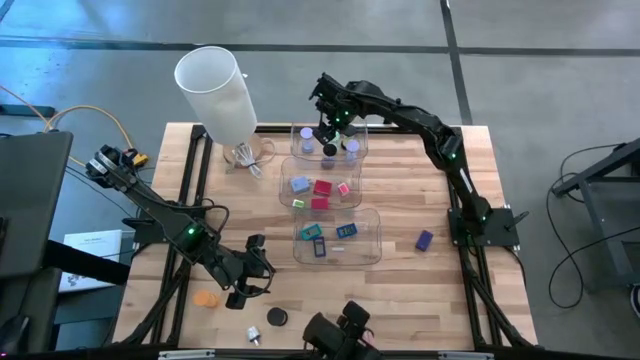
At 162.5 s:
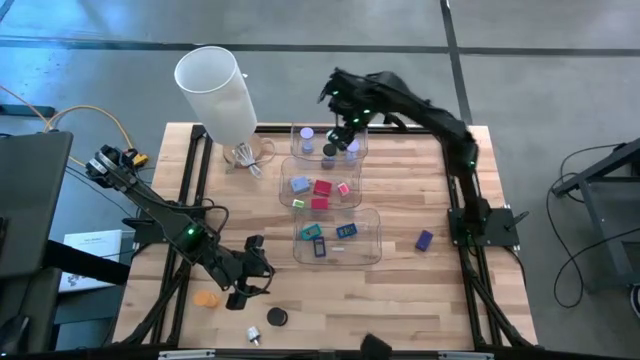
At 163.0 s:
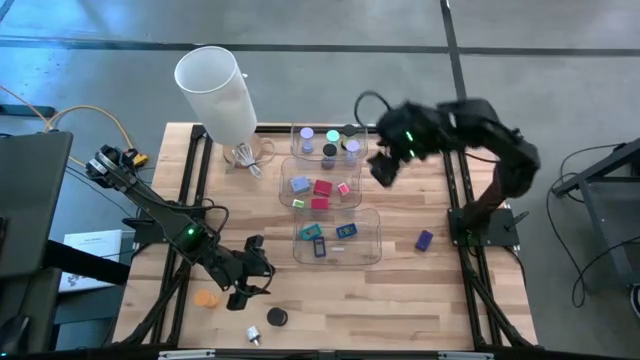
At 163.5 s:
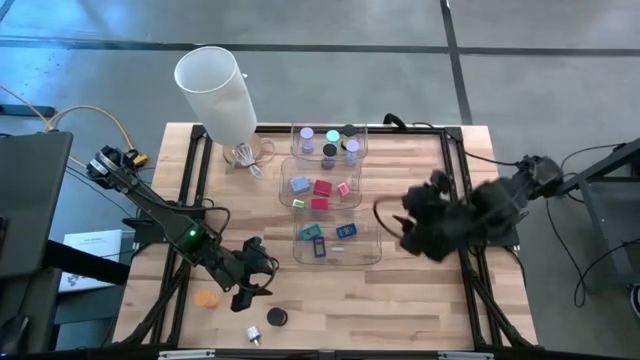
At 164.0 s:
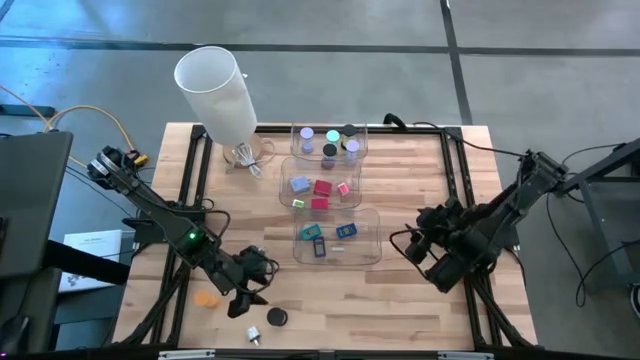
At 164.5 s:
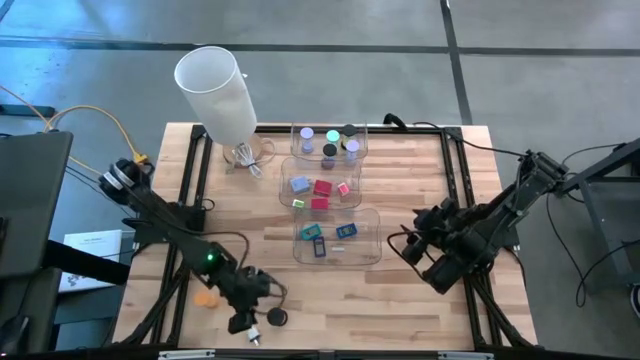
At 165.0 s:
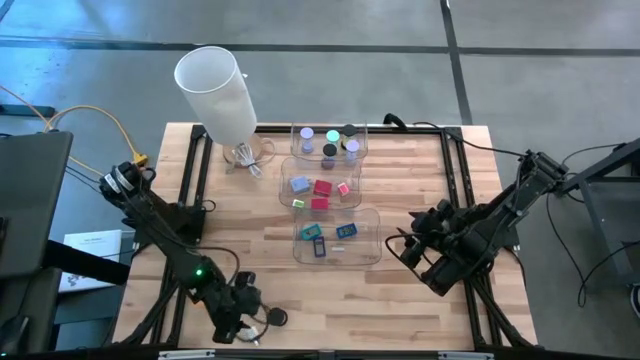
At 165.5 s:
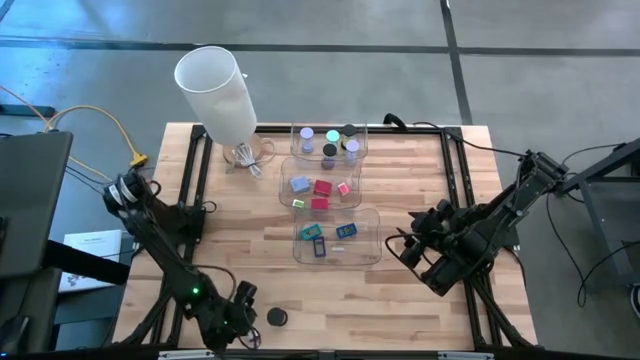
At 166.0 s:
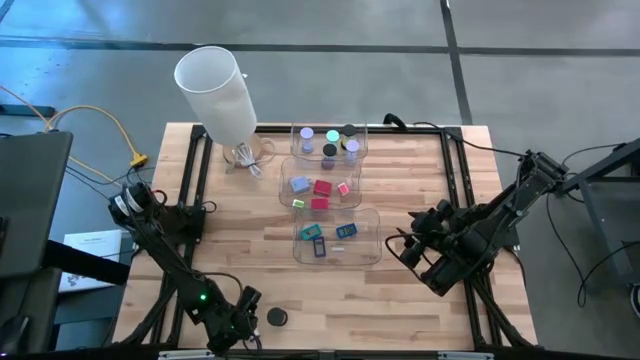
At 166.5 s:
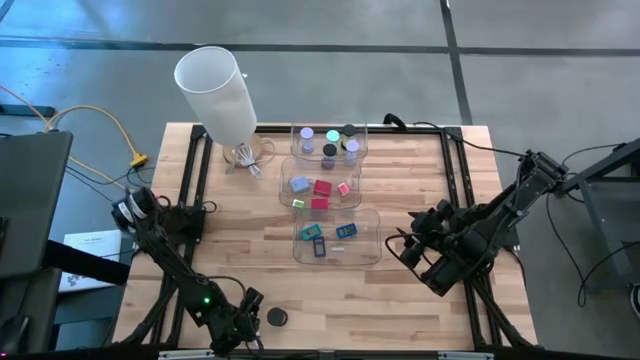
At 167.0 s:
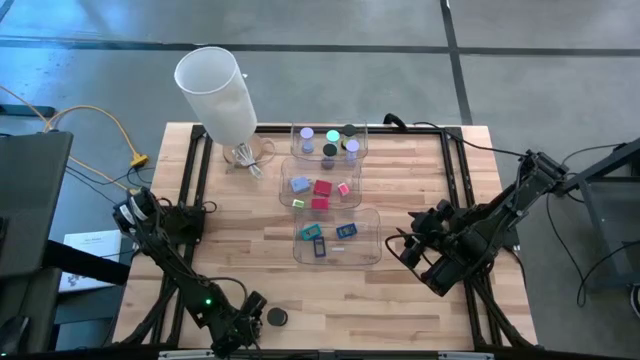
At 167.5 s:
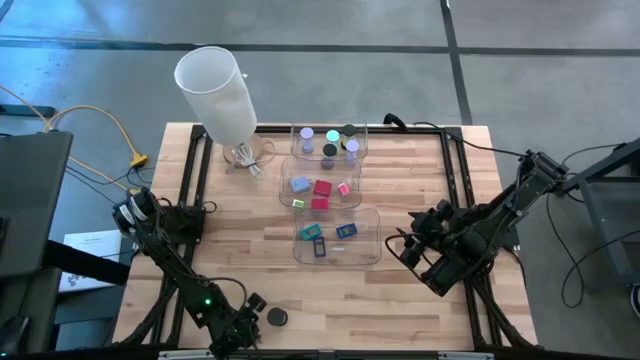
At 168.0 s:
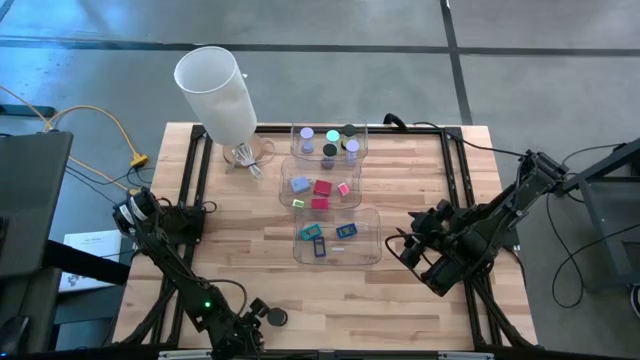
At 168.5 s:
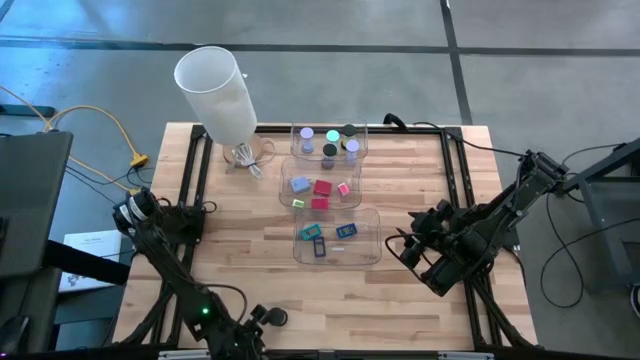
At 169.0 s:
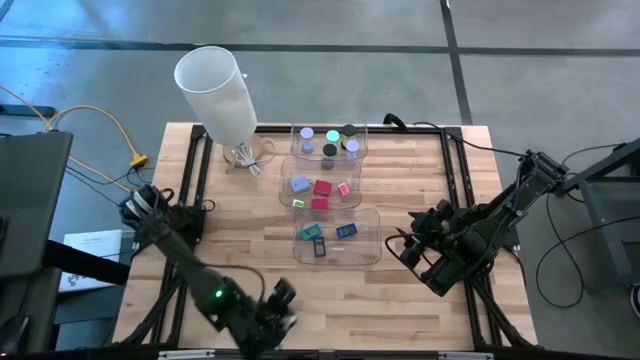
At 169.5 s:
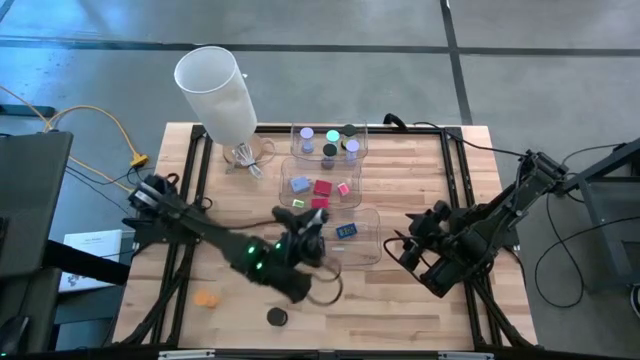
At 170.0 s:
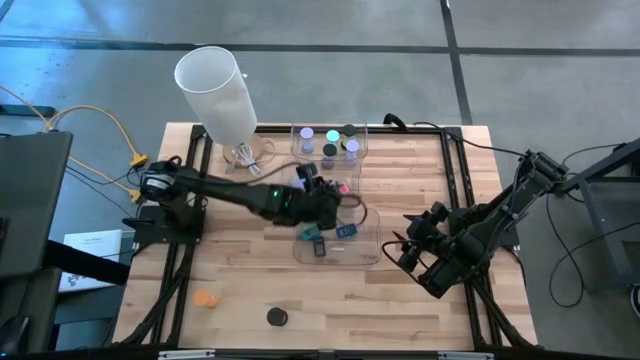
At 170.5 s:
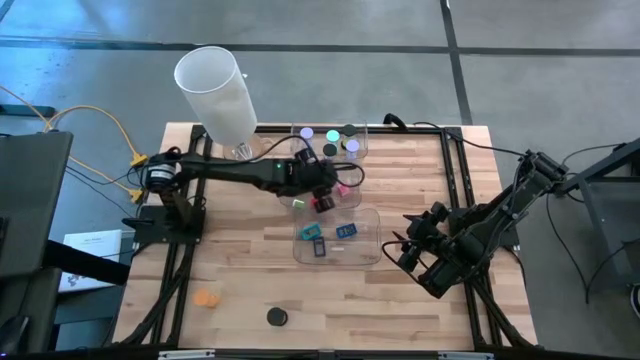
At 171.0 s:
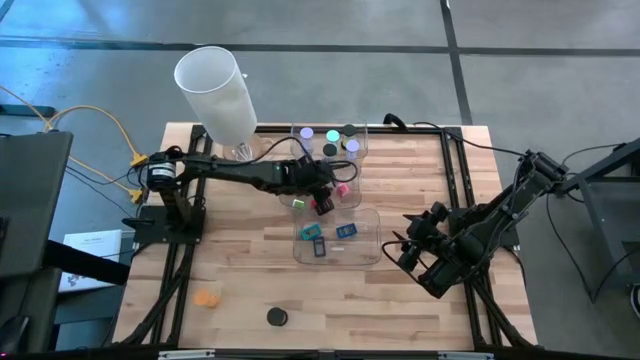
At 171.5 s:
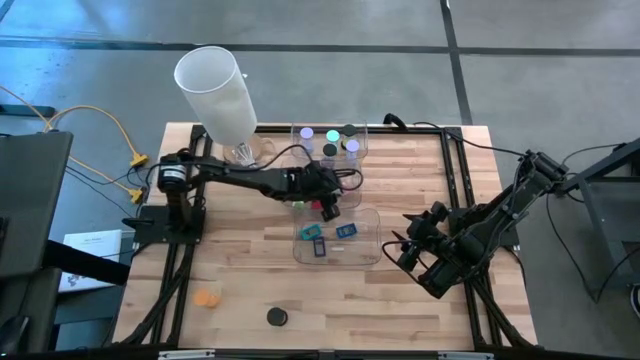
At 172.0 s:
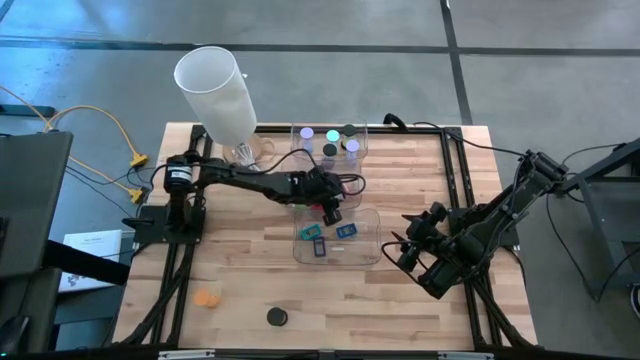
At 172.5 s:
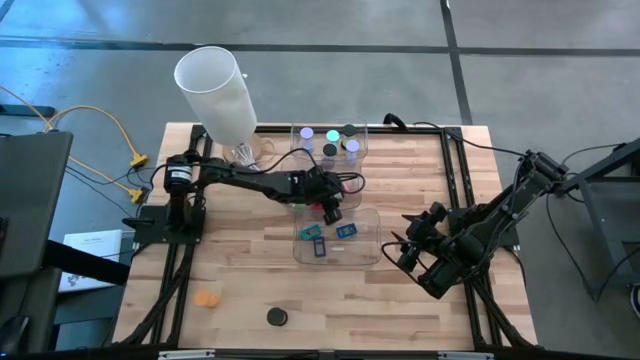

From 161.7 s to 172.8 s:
Task: Pick & Place Office items
Put the small white charger adapter into the middle transparent bin

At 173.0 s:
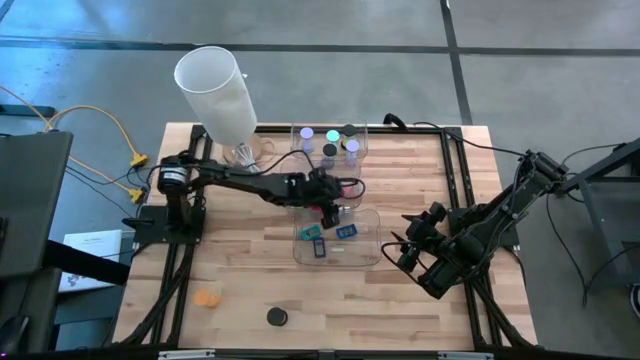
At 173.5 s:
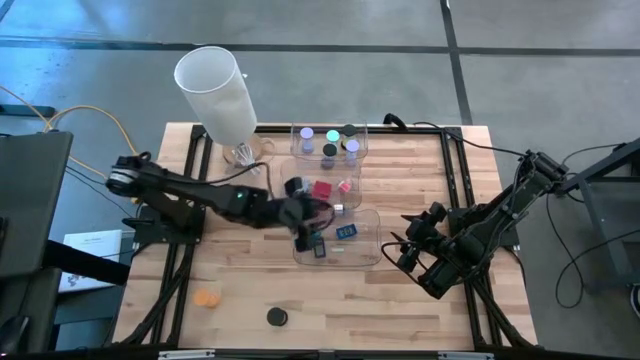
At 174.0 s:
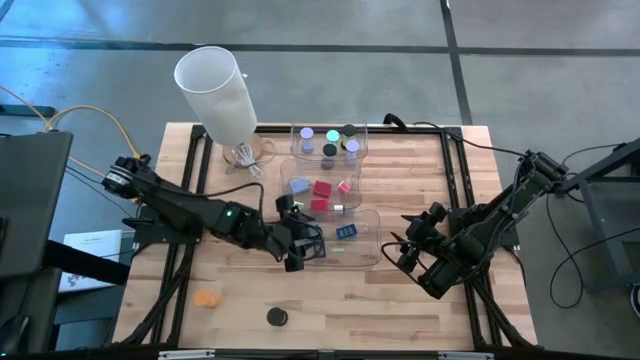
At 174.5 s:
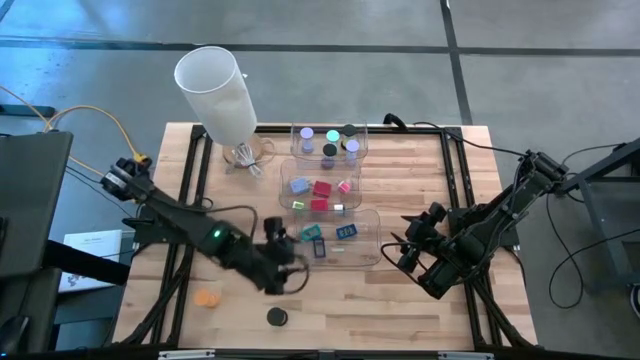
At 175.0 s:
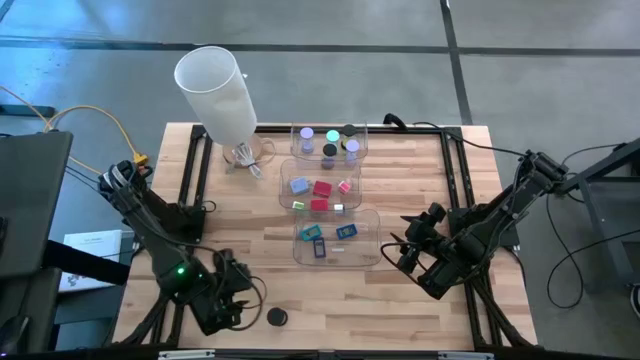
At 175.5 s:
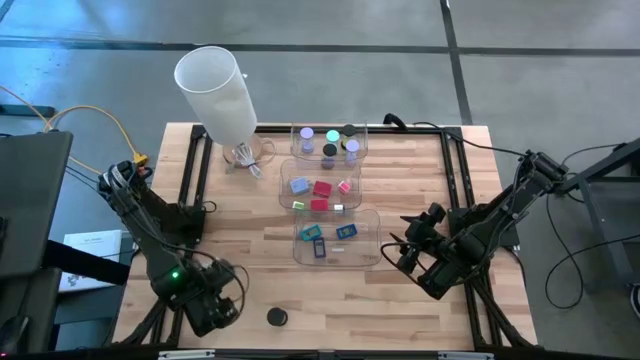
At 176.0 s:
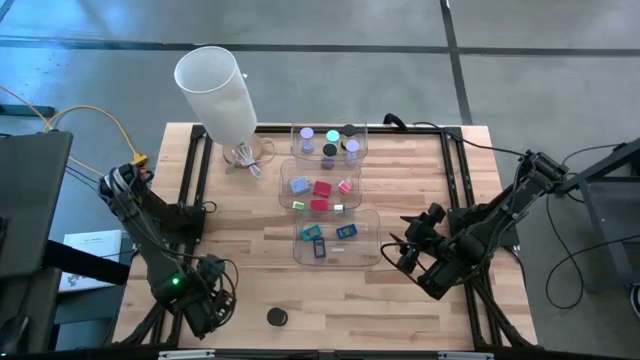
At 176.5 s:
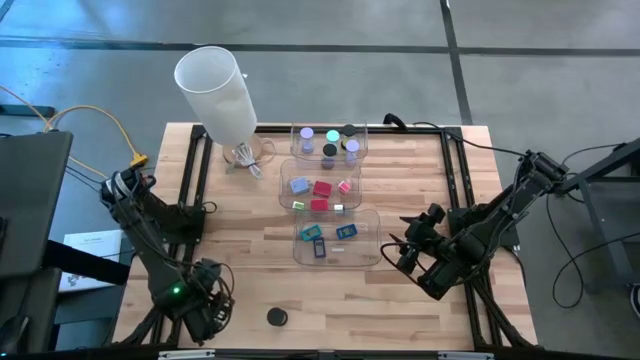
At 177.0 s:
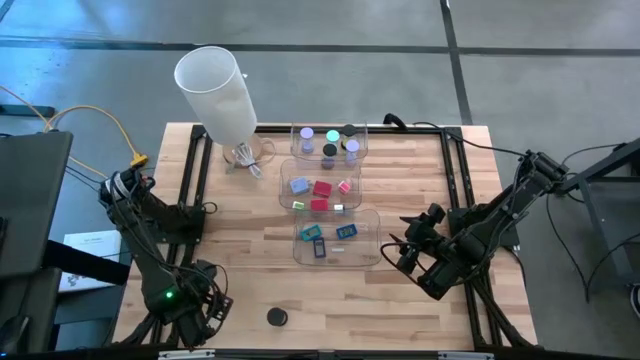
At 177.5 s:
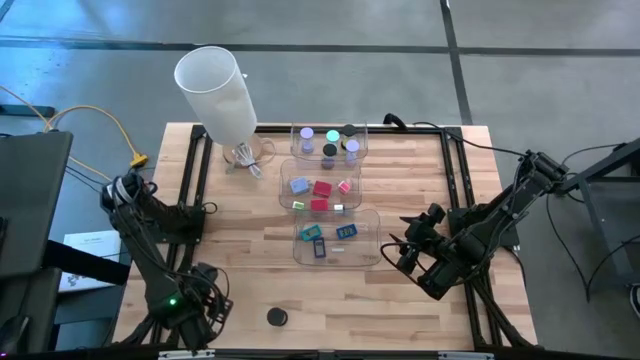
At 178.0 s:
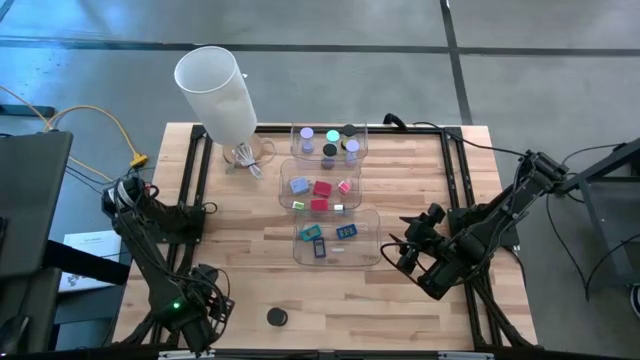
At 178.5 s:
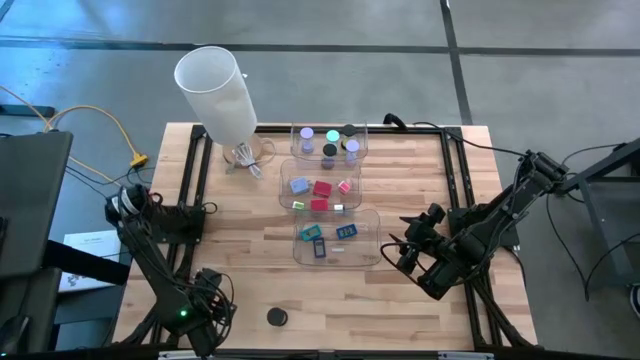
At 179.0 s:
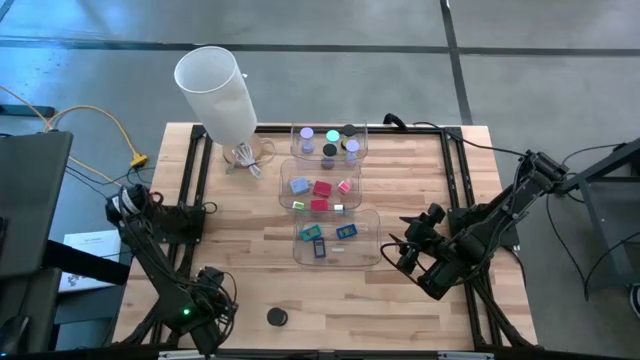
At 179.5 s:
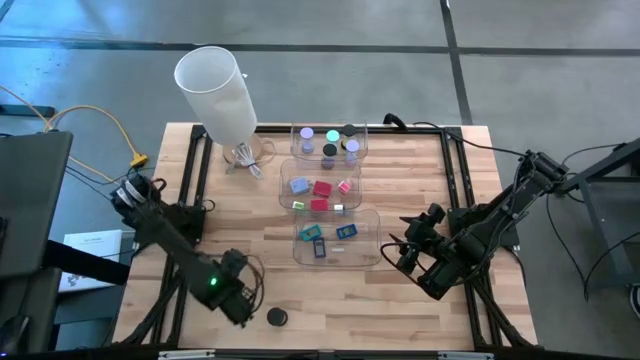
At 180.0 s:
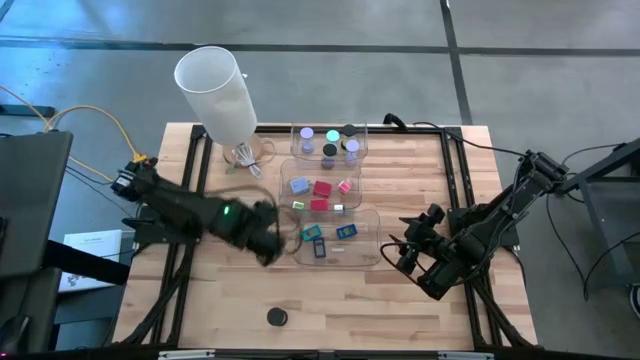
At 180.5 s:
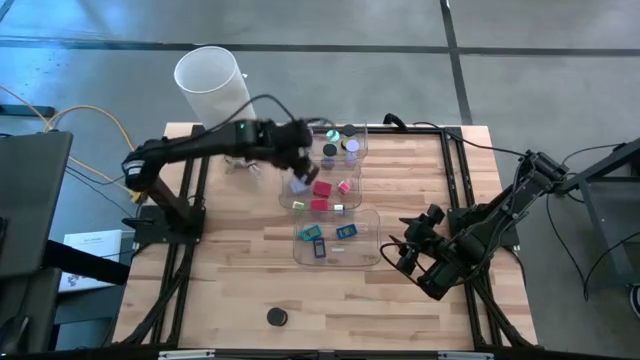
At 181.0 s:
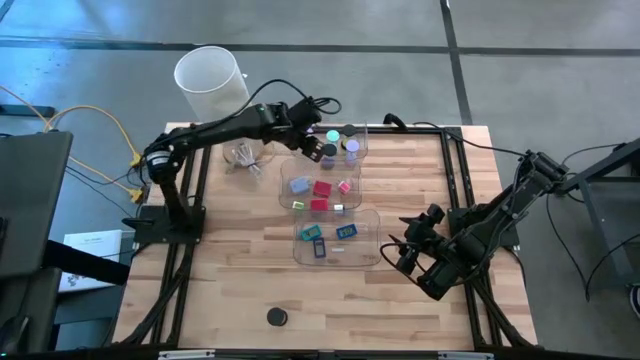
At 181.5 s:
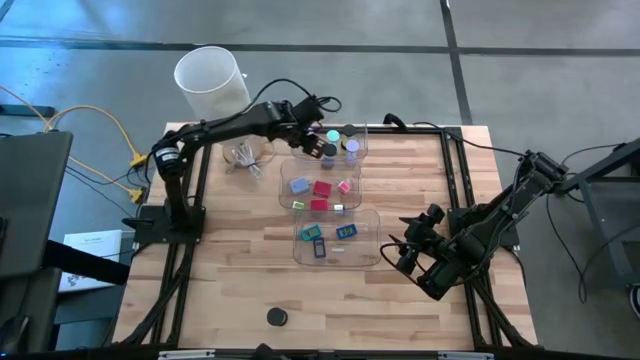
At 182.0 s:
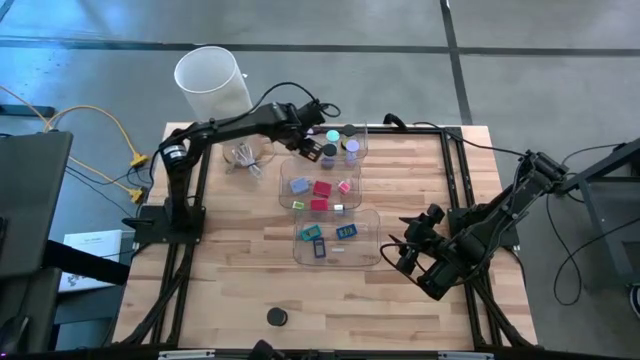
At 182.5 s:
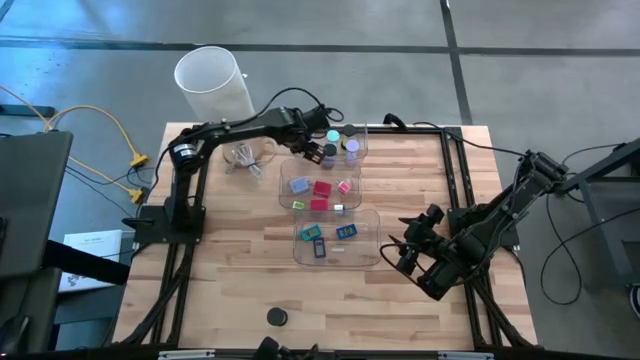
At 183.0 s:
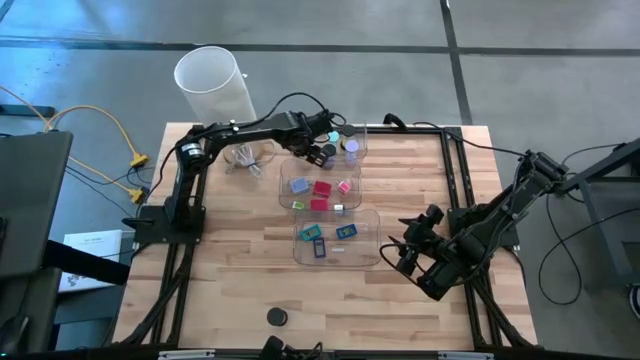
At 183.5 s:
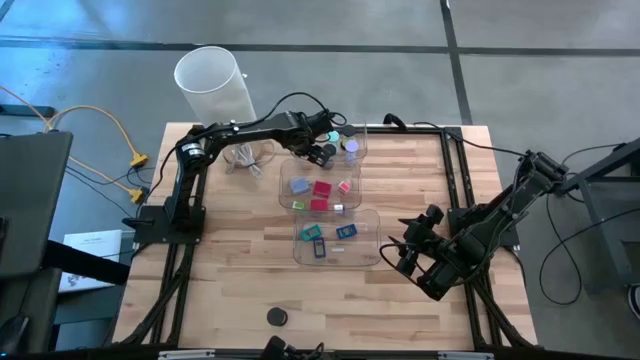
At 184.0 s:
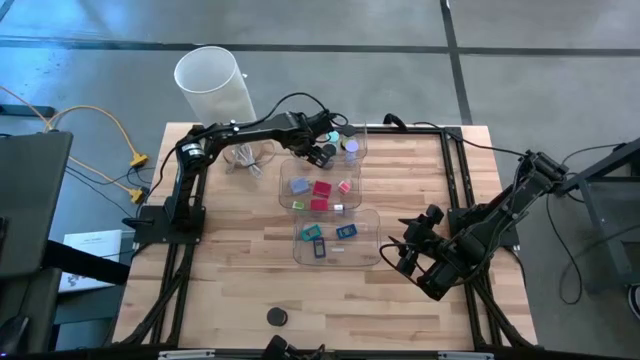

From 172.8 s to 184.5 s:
Put the yellow hourglass into the top transparent bin
